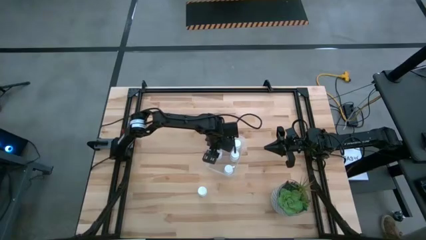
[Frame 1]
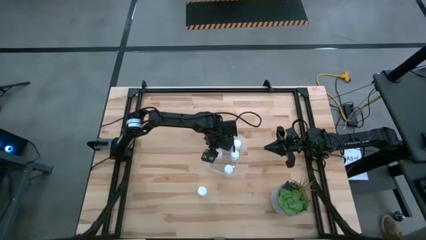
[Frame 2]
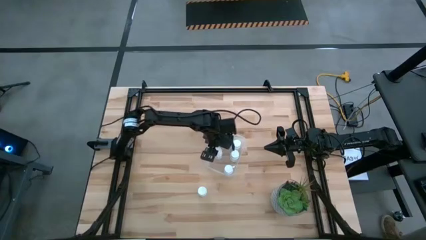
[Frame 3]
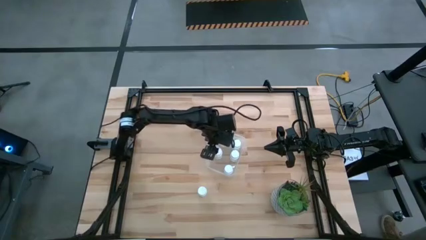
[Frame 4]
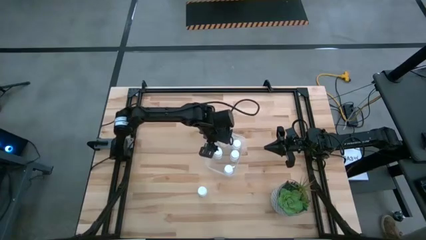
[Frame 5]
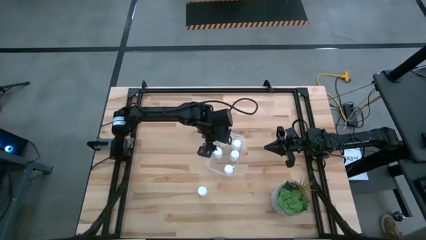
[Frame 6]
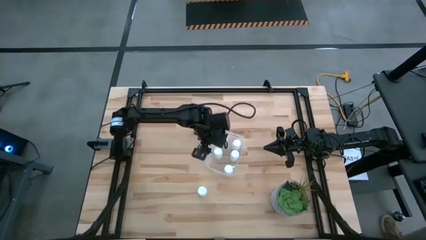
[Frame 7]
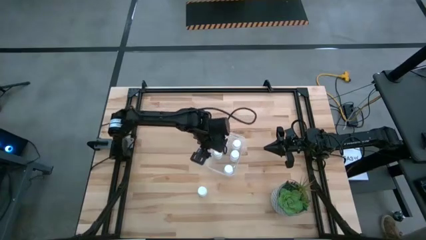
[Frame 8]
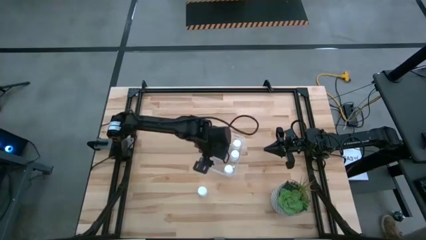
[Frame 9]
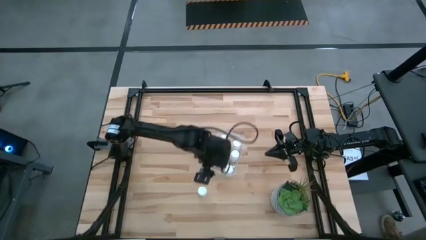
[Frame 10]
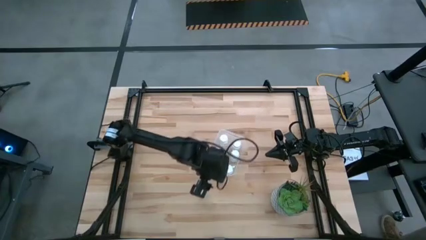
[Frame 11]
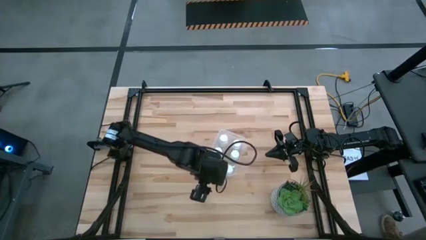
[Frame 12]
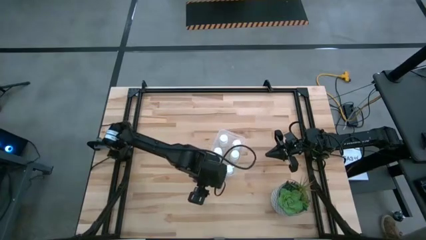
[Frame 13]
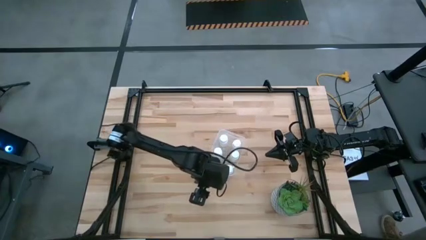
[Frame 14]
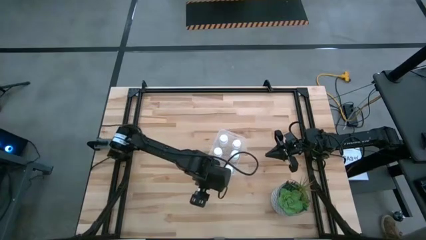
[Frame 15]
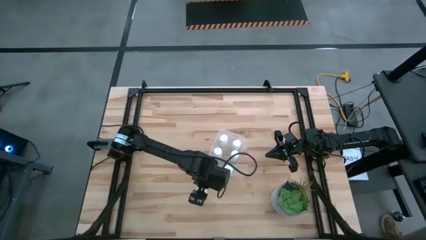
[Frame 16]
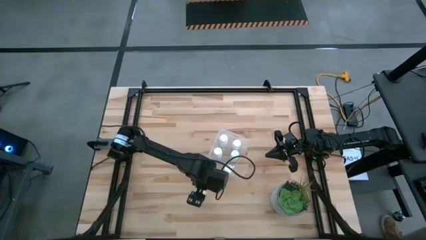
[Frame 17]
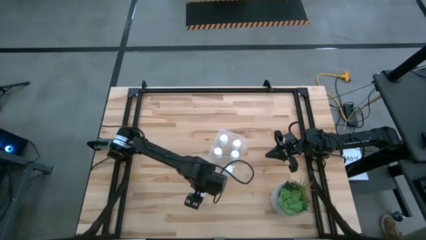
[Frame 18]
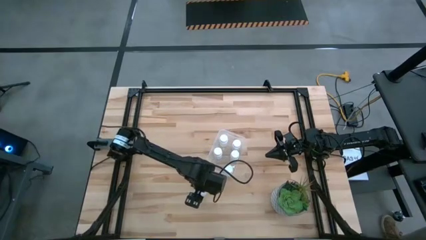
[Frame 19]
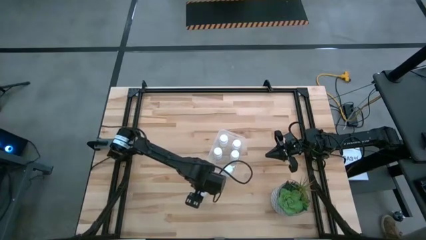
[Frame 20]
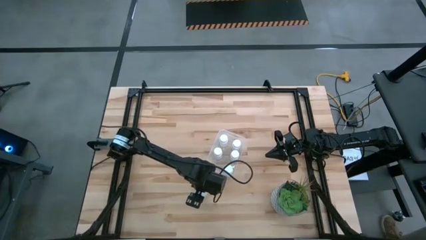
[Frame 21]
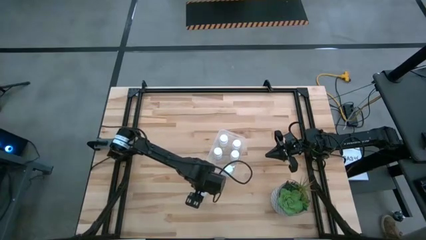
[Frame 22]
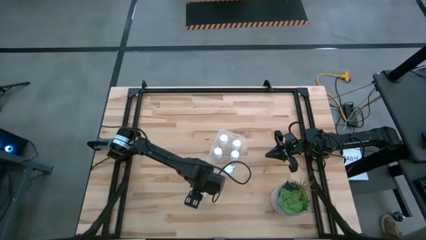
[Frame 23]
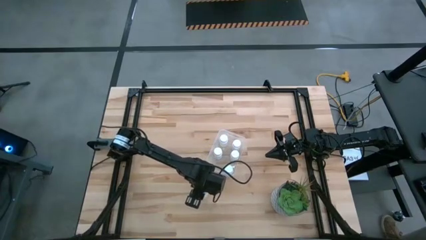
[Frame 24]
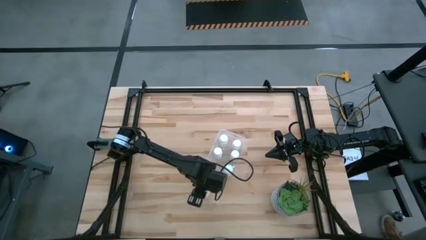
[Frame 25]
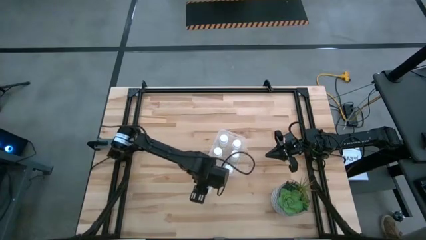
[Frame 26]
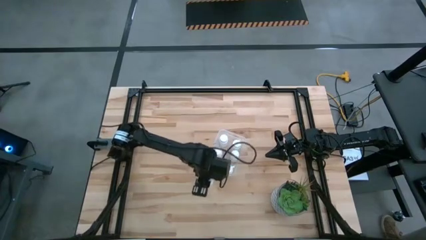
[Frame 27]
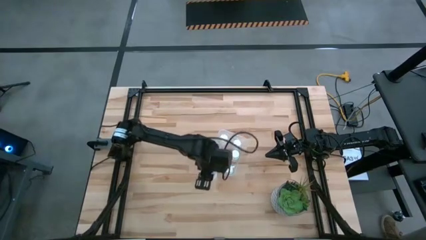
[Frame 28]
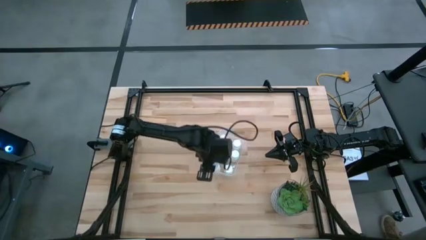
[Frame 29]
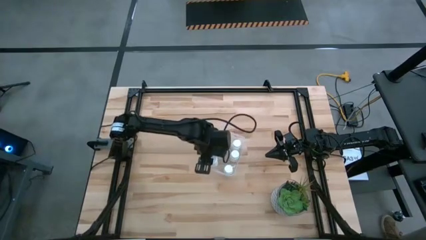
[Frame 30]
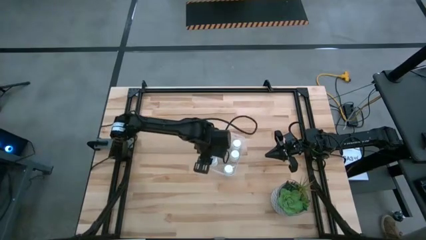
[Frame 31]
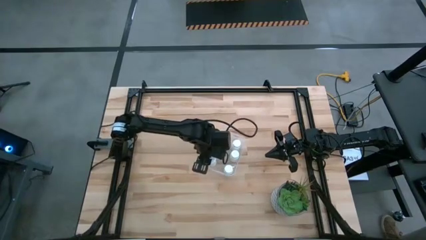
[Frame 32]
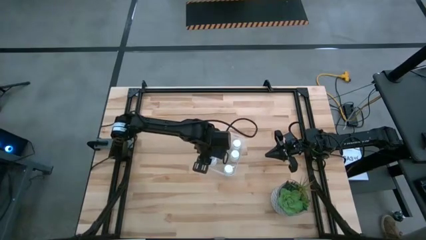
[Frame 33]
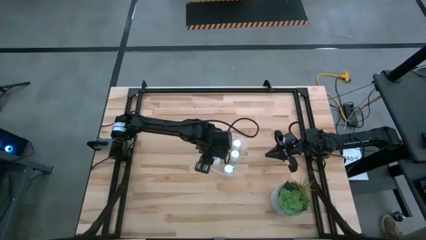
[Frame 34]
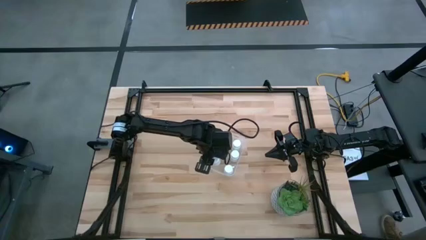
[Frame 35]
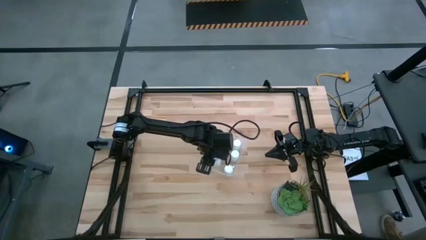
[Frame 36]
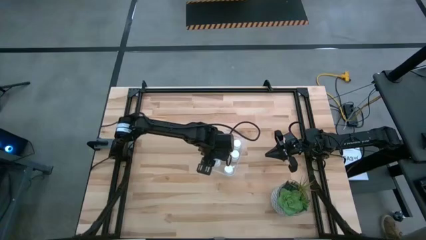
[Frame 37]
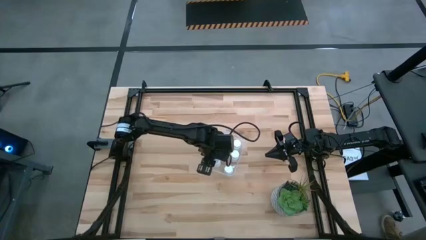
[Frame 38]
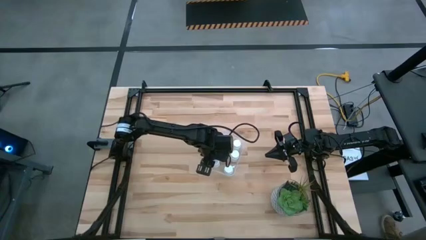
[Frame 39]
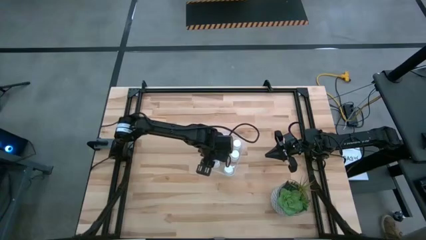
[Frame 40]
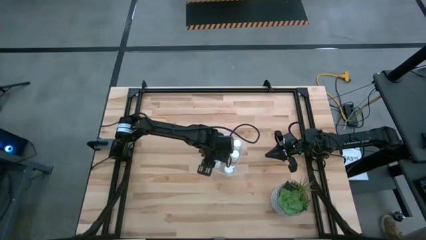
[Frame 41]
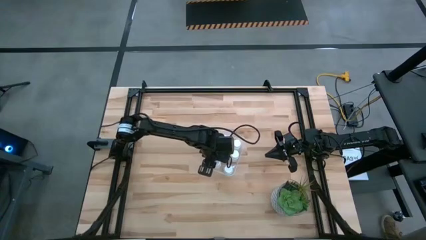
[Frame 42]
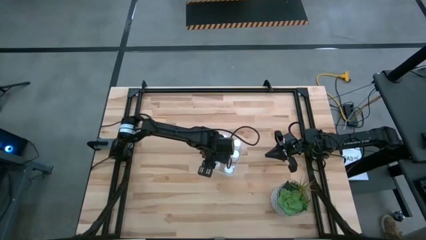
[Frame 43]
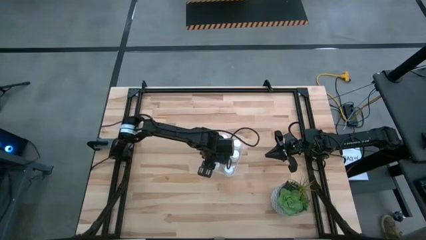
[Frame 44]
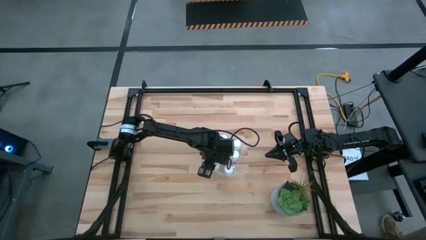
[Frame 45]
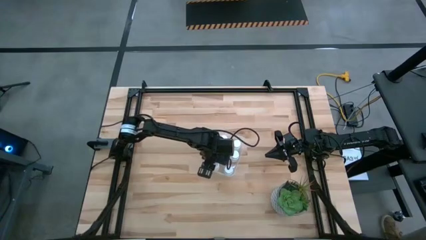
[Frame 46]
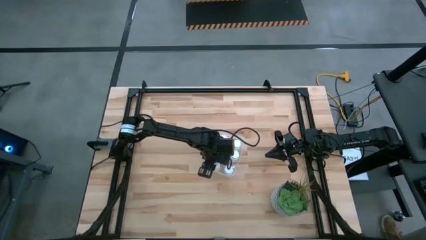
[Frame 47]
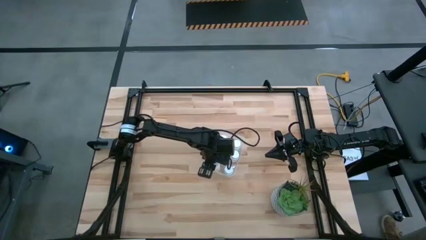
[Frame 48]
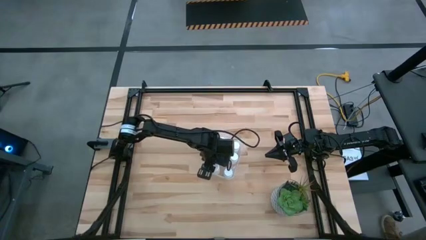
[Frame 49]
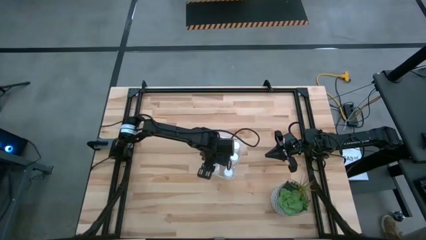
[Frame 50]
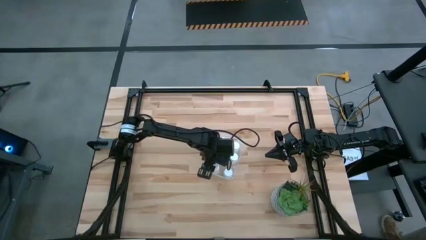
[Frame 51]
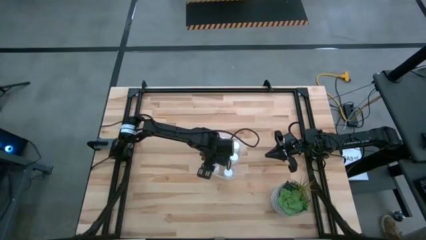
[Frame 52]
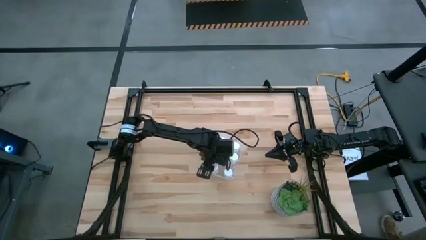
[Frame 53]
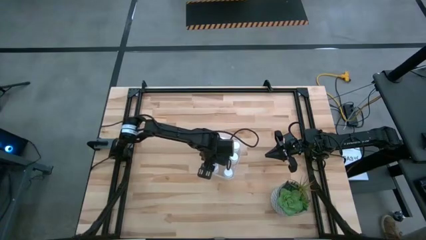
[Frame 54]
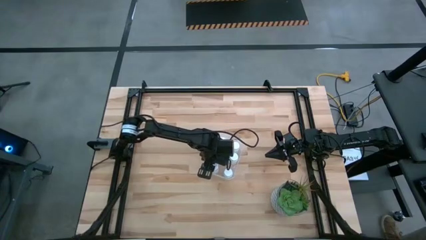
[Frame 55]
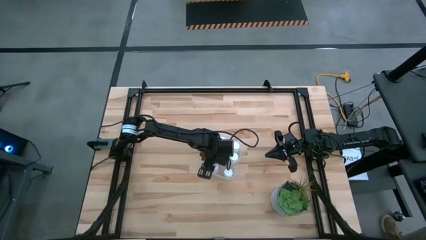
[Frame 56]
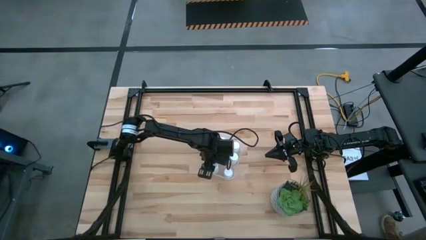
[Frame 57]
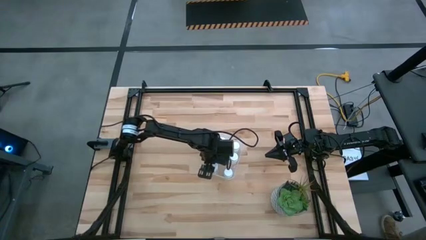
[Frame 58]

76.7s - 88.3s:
Task: Pick and place pill bottles into a basket
Put the medicine bottle into the transparent bin

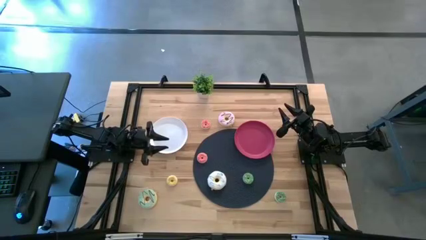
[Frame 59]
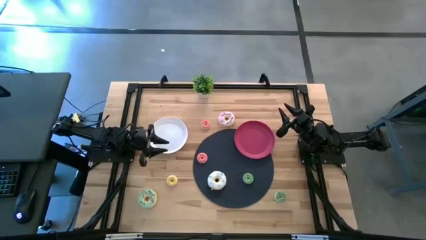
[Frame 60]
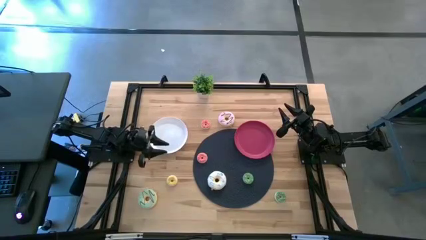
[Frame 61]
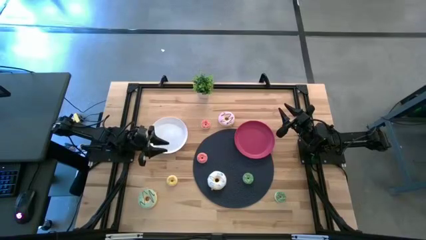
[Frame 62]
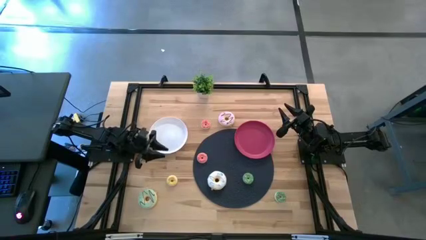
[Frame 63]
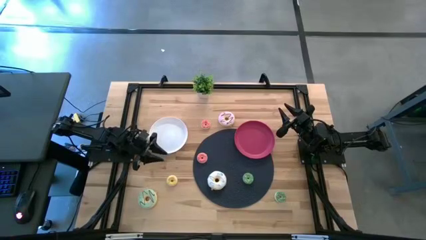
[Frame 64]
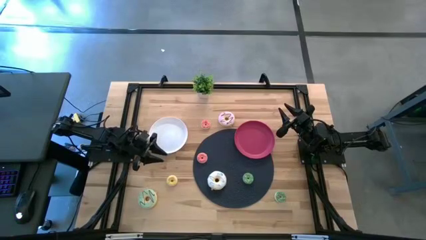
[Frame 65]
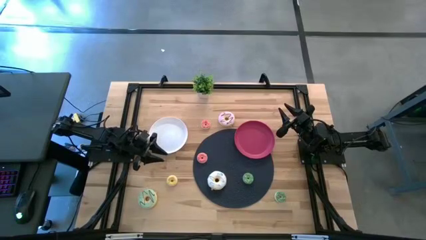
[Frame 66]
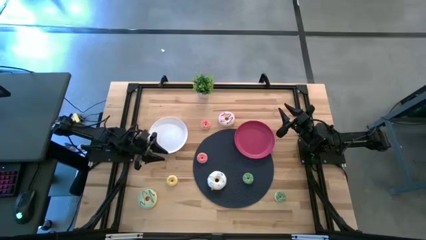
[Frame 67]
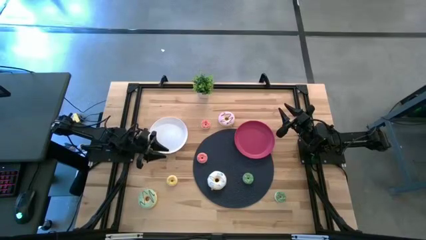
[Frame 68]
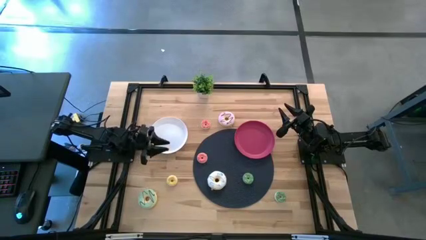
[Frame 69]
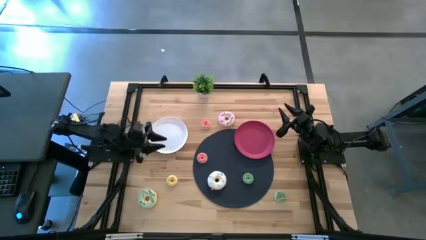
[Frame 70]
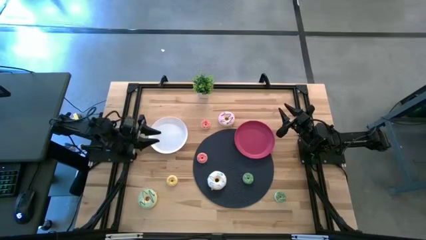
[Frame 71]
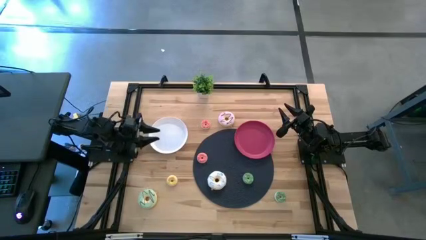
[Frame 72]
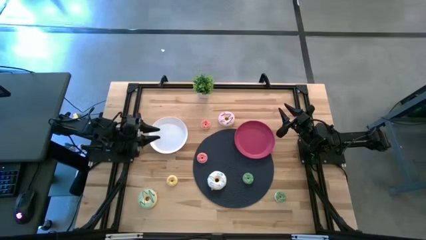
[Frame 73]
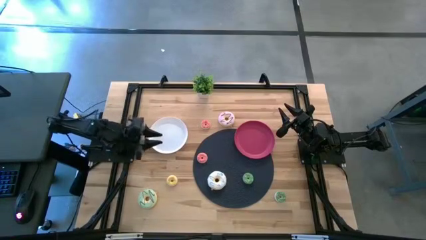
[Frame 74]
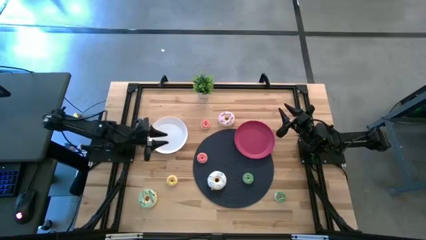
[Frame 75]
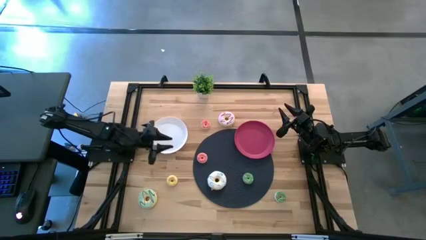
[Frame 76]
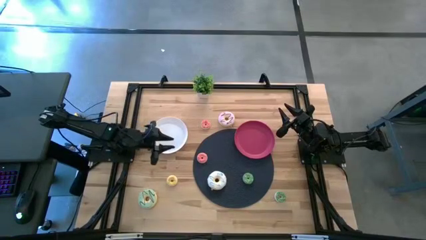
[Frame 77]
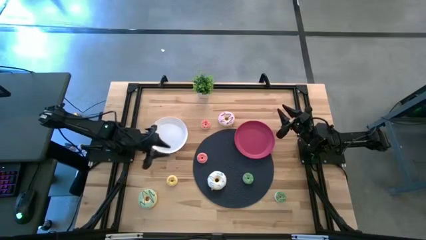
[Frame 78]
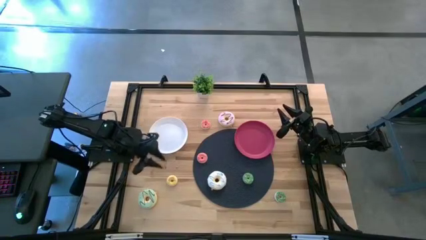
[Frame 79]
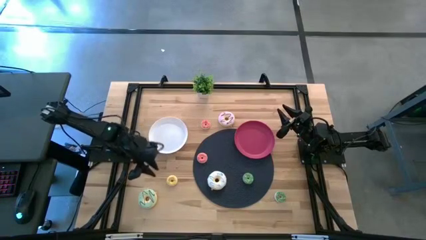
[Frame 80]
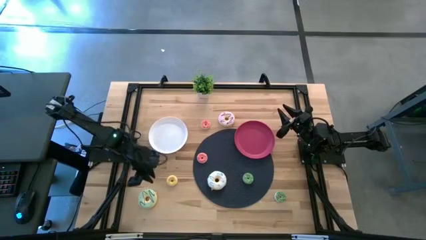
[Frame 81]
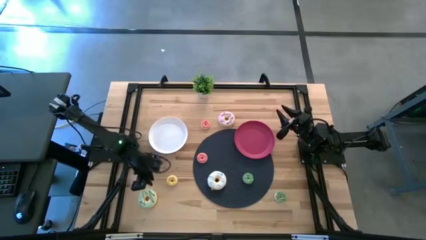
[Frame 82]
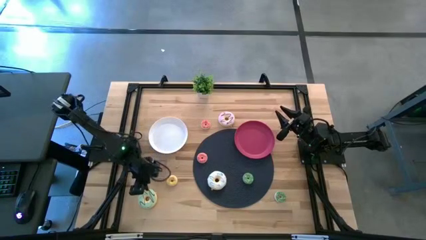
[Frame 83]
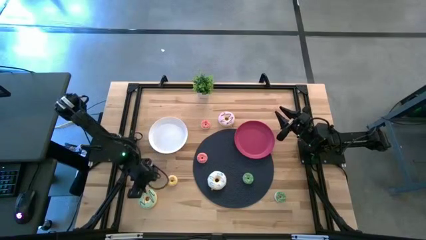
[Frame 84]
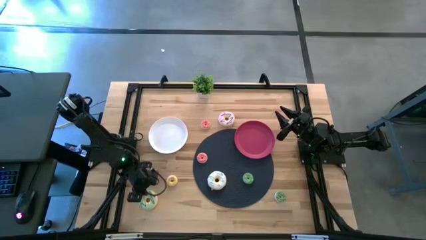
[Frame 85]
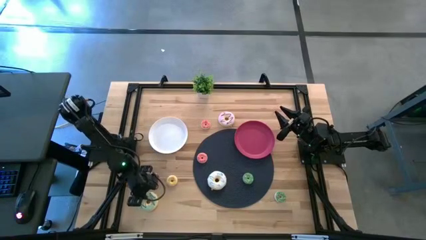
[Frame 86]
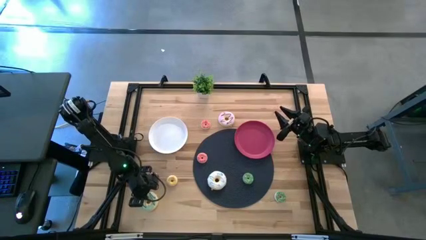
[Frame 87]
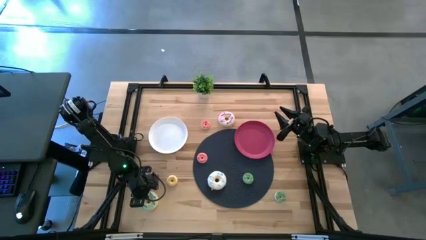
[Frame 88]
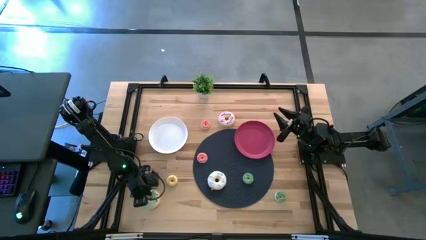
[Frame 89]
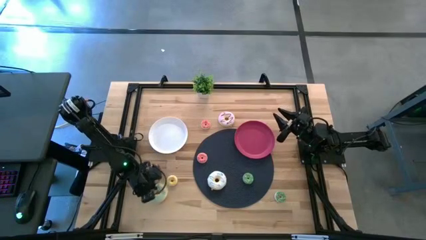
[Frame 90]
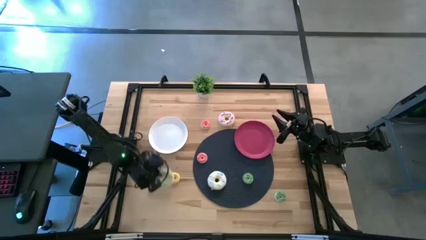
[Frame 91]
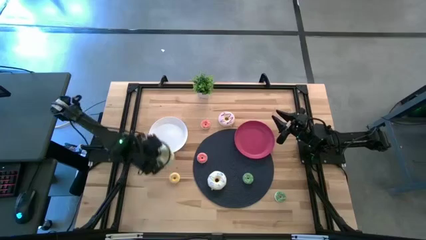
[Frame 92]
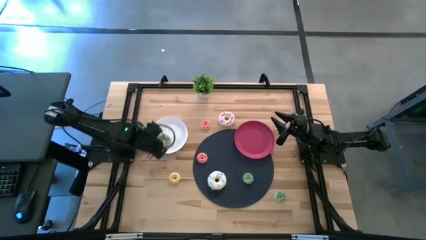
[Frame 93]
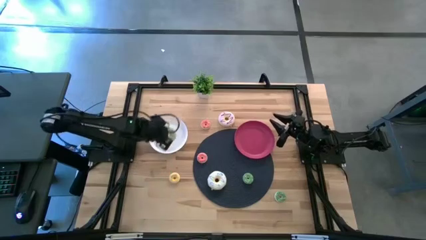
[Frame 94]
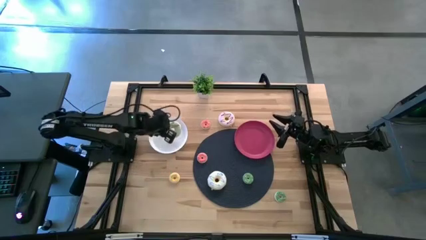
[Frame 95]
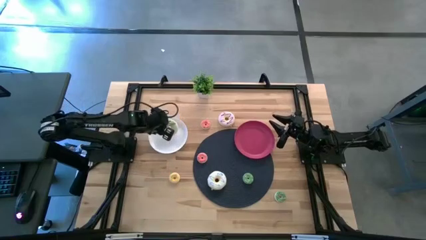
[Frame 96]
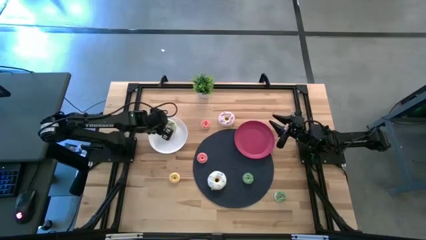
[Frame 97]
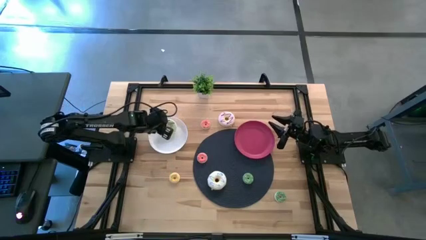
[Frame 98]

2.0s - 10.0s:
Task: Pick & Place donuts
Put the blue donut onto the white plate
